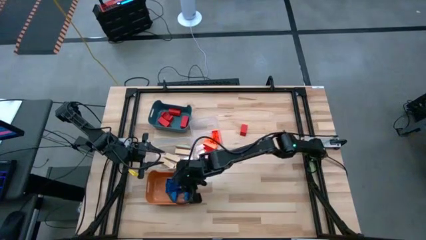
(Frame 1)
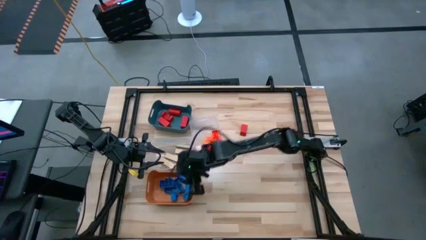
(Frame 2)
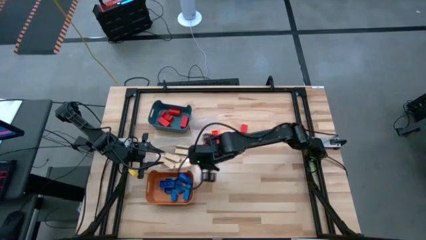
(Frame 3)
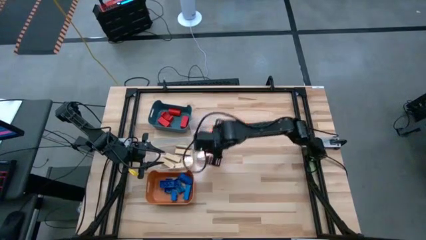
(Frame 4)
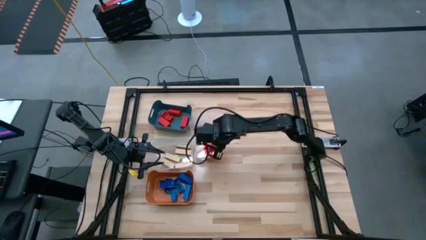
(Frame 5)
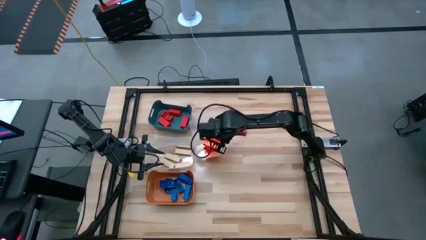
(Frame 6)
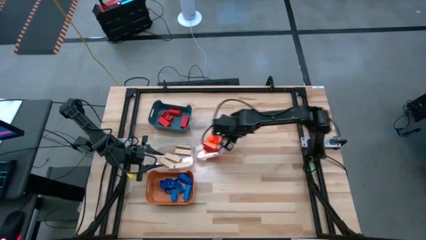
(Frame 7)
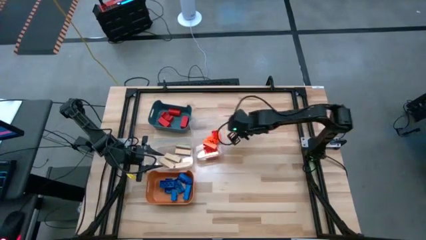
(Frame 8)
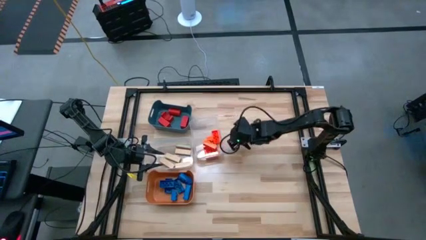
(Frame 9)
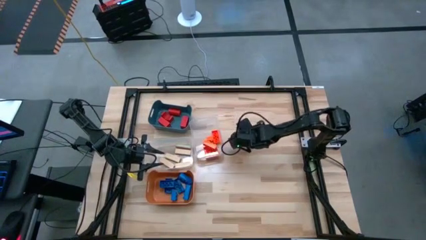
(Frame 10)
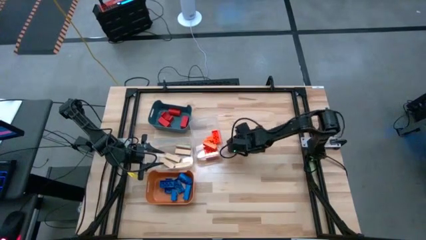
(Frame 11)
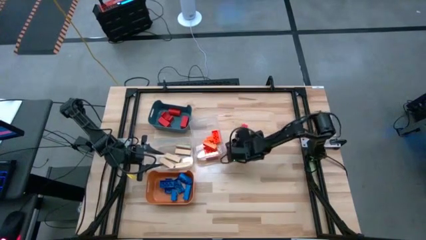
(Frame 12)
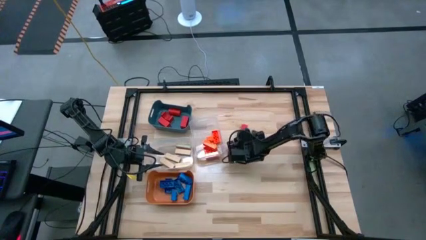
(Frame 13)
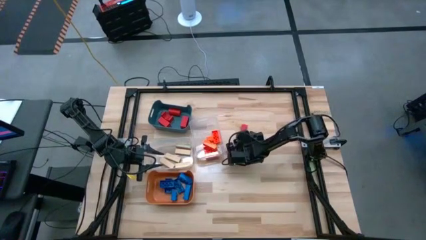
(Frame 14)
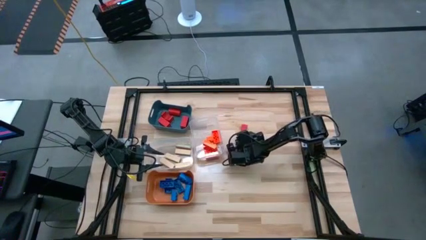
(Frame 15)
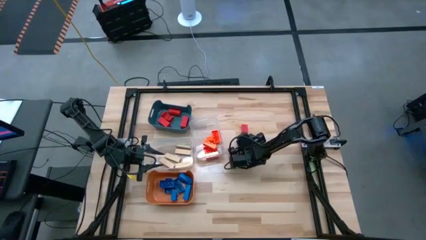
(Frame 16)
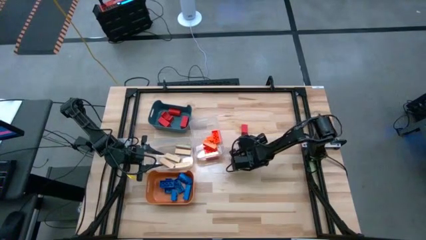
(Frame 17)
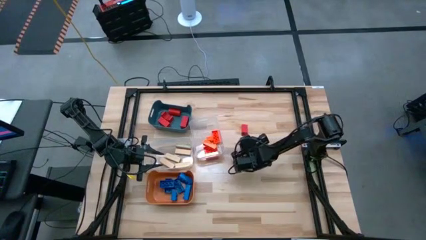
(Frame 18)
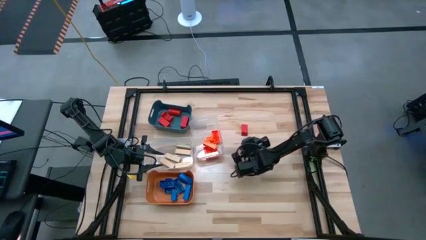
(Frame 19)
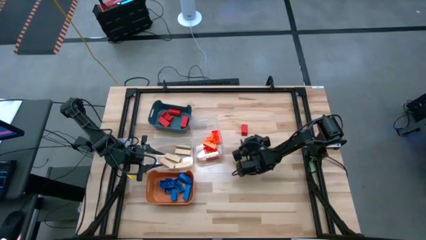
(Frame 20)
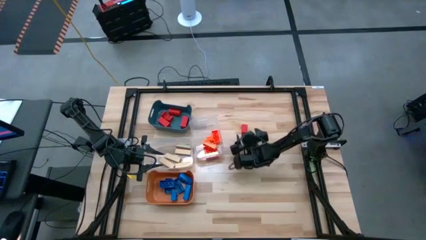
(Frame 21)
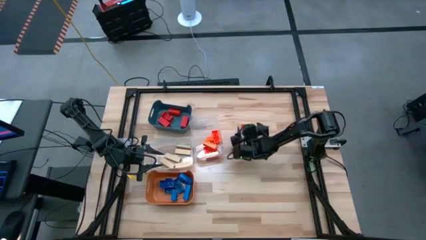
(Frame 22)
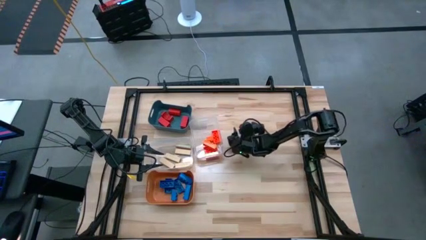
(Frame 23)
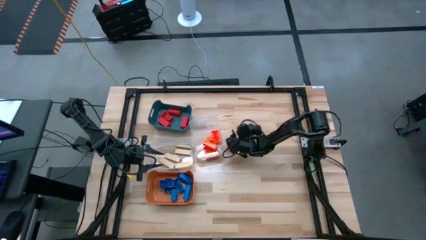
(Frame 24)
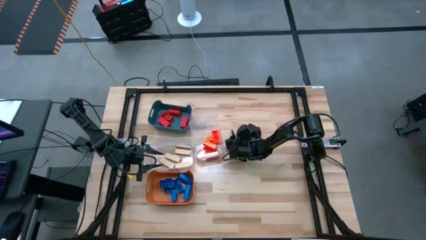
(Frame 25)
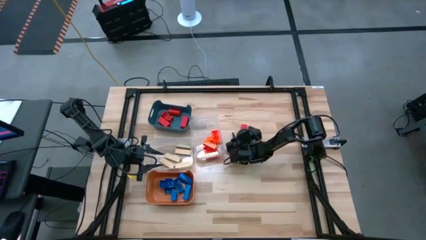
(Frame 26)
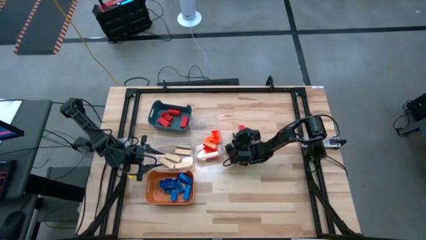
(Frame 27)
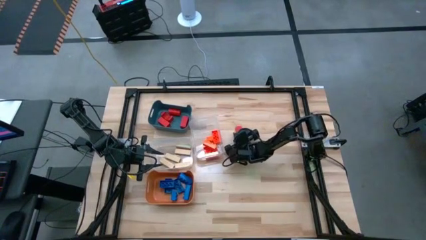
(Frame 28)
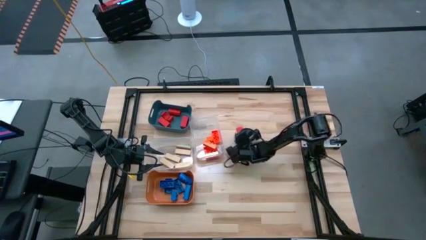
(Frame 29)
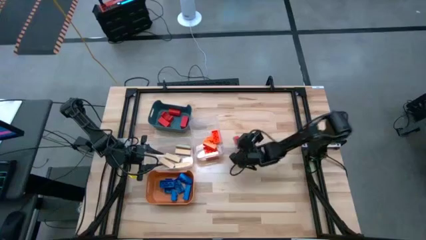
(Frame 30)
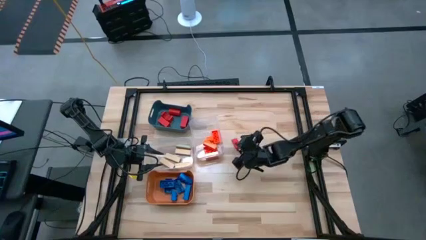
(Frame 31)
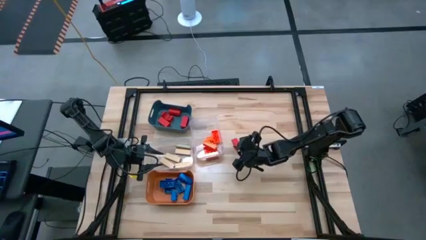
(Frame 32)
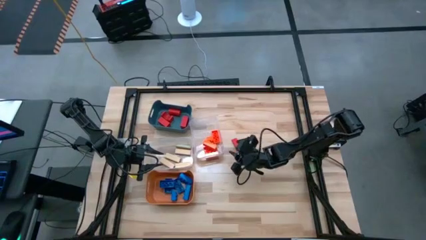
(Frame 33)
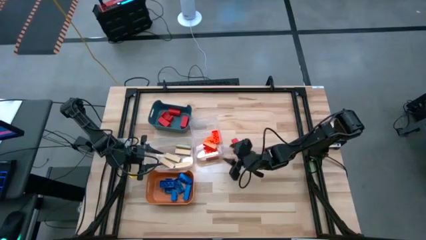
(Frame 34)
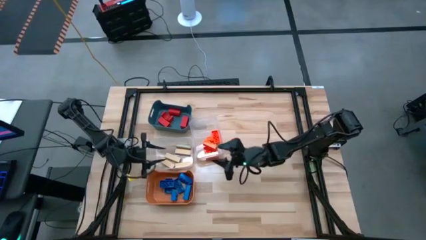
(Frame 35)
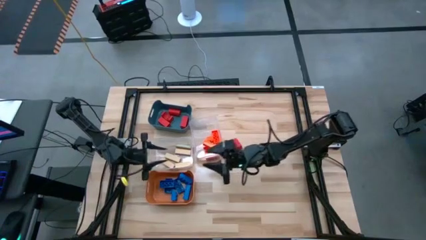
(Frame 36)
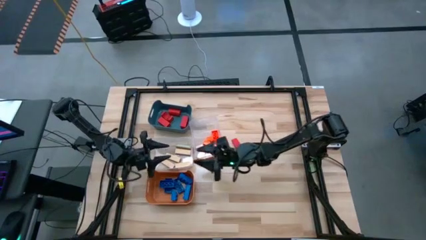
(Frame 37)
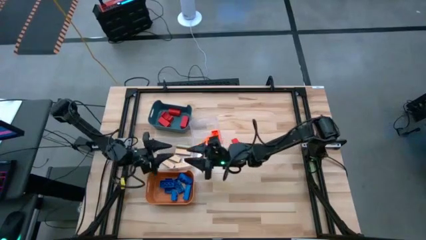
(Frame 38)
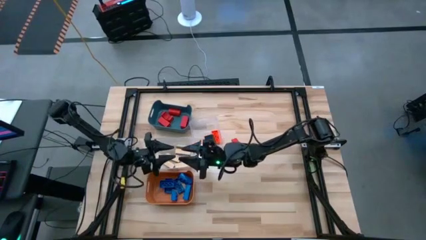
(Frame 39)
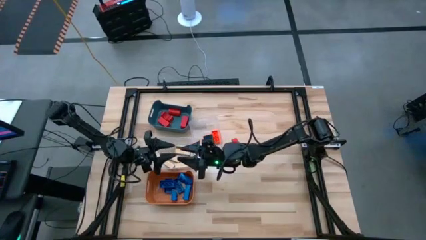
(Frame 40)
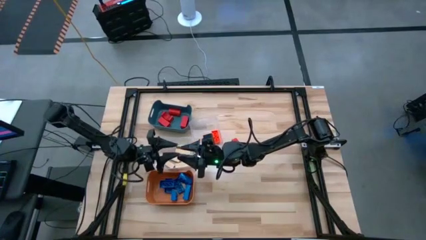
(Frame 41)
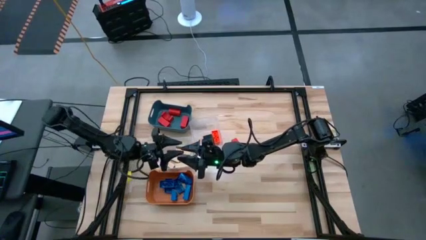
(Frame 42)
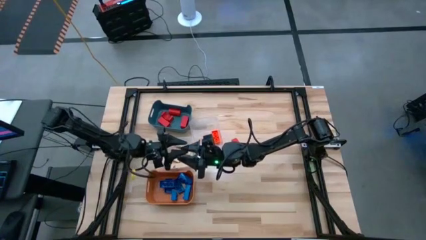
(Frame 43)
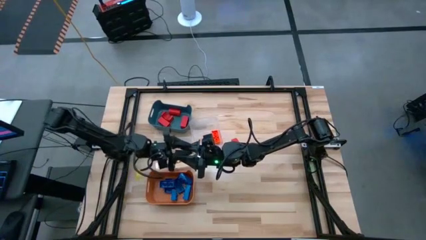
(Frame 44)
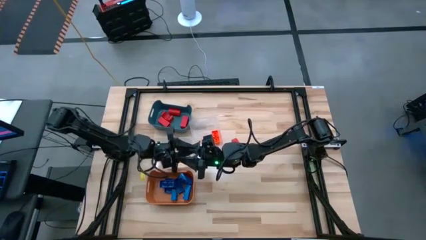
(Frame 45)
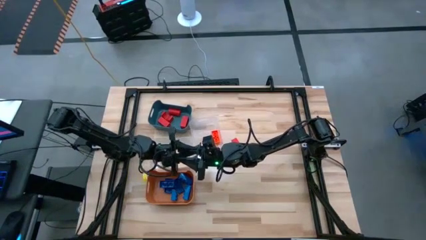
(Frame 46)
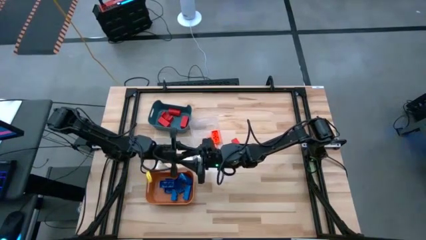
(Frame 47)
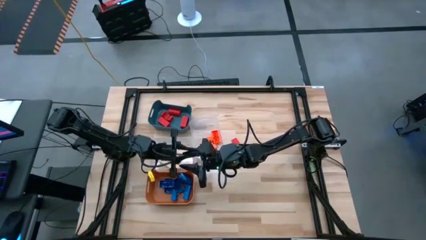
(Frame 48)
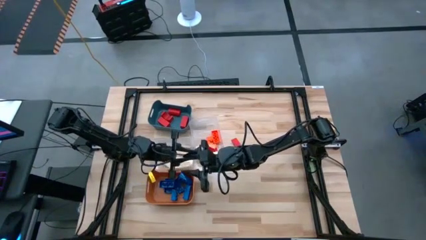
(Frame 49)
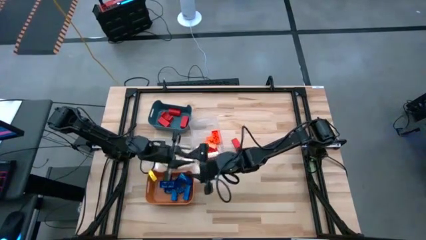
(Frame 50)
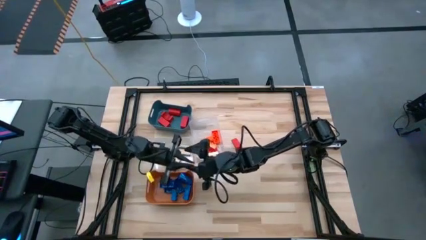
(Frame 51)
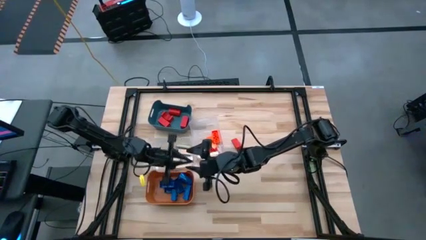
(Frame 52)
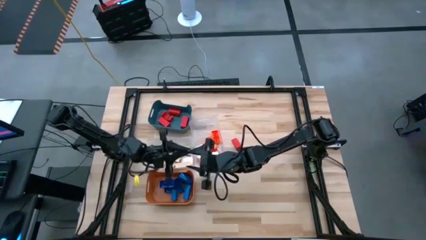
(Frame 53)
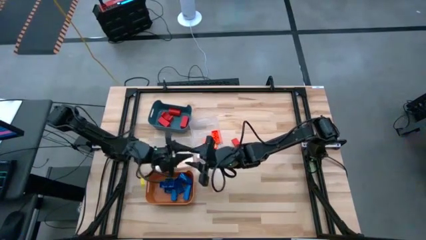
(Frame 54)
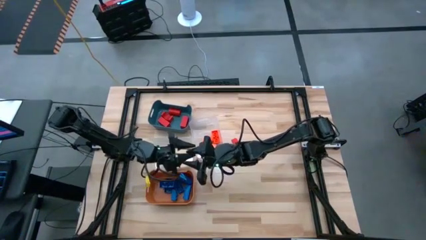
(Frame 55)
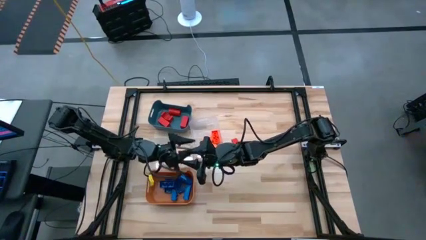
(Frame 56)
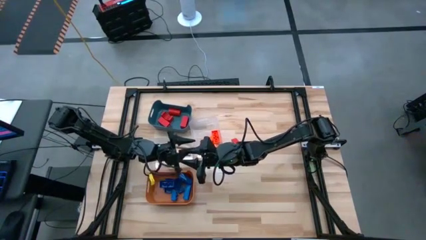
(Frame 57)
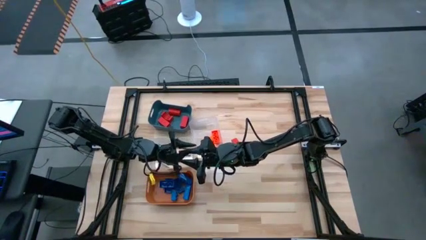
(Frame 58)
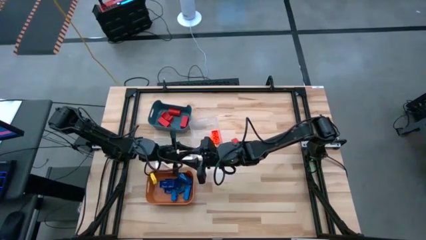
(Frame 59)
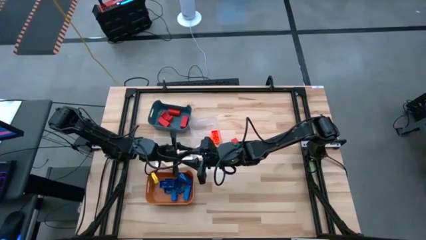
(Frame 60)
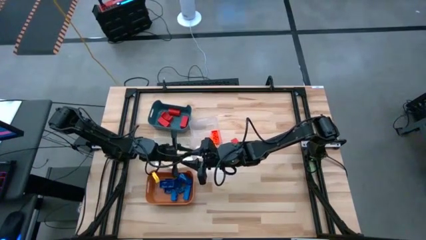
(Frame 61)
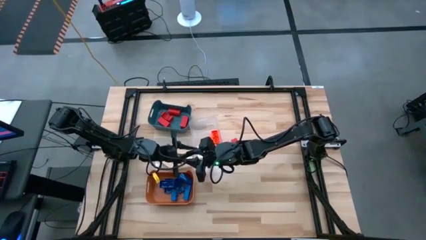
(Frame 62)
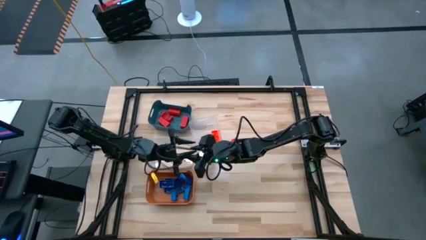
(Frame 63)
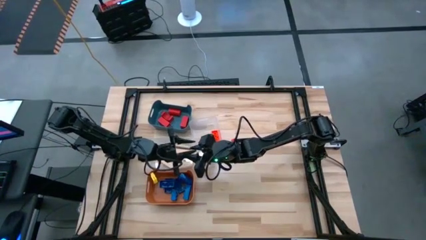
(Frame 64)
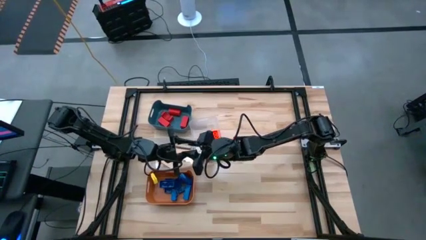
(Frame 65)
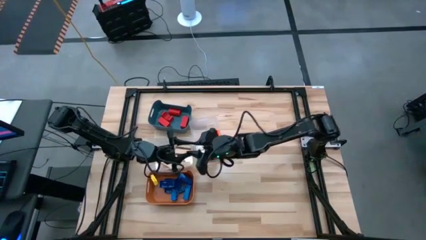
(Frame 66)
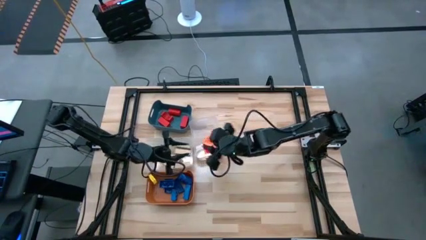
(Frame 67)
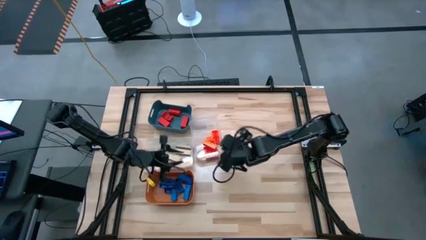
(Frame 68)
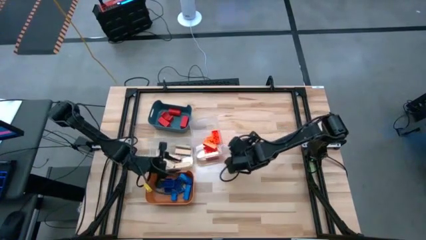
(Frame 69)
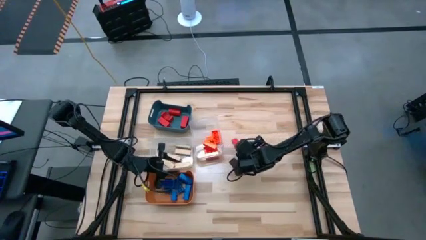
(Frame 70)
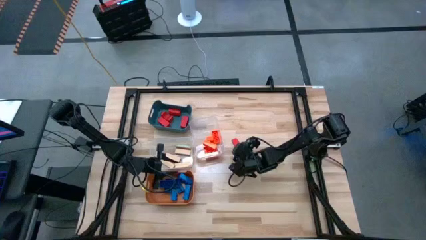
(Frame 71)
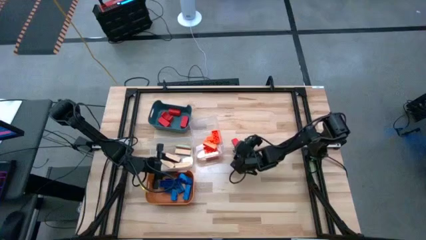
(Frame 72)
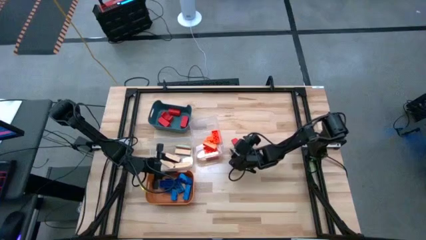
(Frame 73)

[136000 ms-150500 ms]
Task: Sort blocks
Put the red block into the blue bin

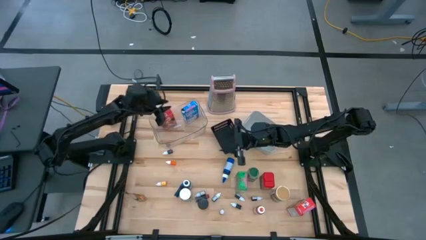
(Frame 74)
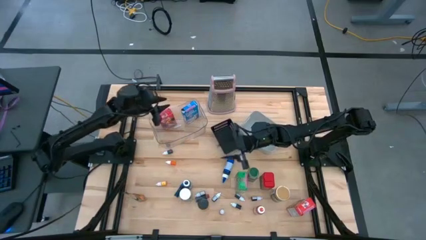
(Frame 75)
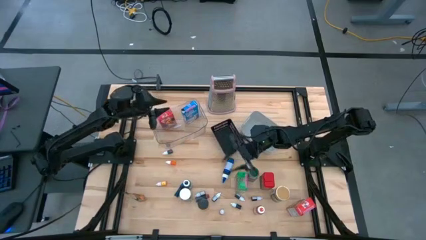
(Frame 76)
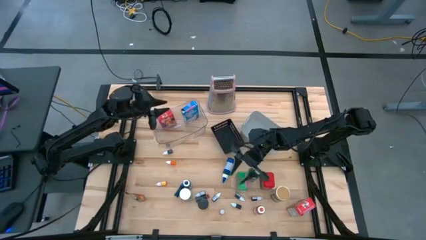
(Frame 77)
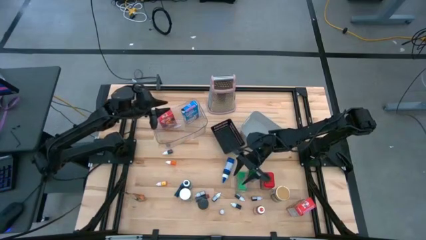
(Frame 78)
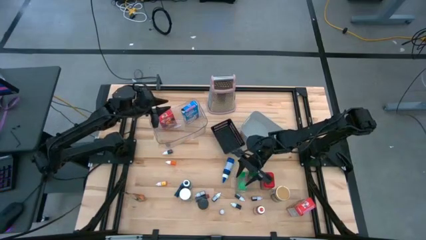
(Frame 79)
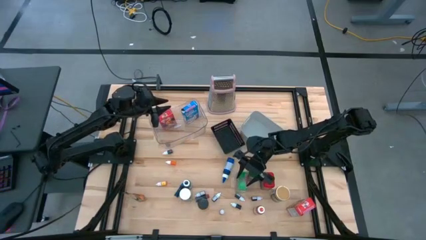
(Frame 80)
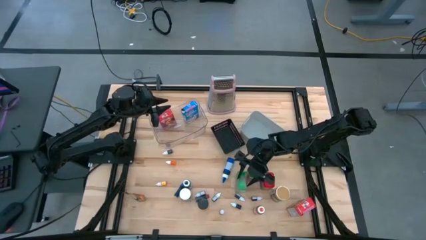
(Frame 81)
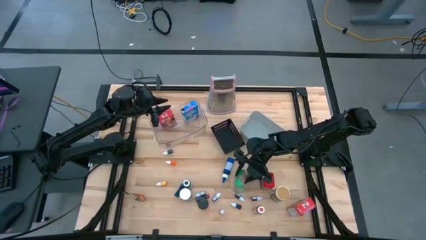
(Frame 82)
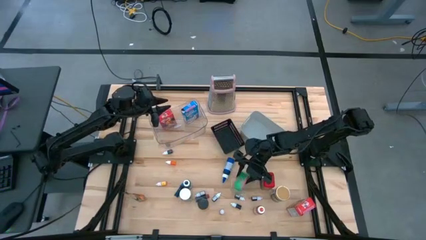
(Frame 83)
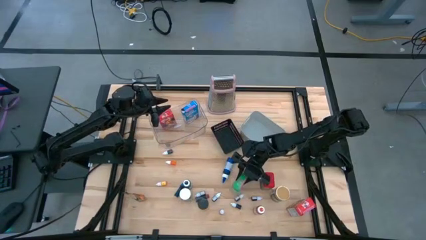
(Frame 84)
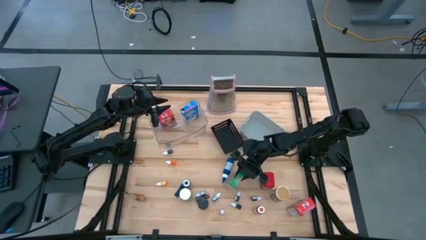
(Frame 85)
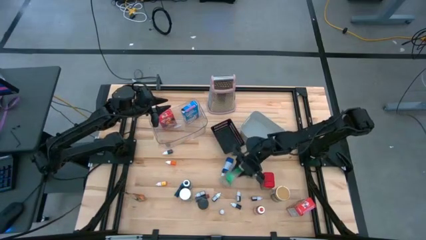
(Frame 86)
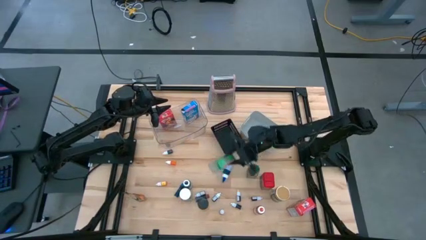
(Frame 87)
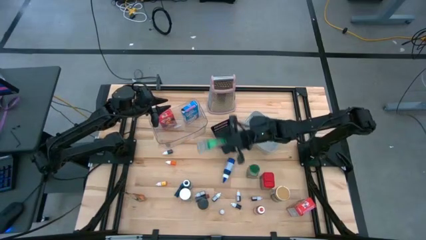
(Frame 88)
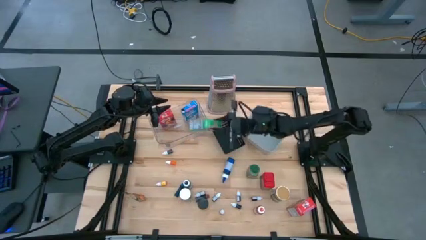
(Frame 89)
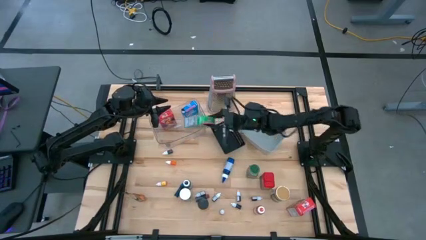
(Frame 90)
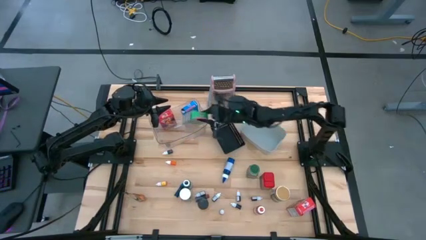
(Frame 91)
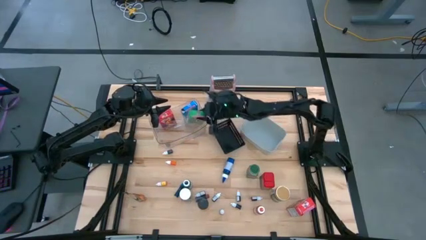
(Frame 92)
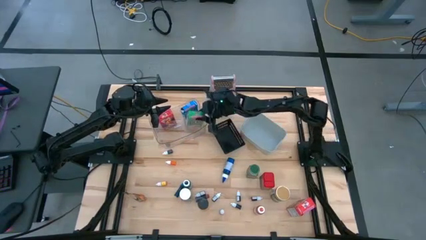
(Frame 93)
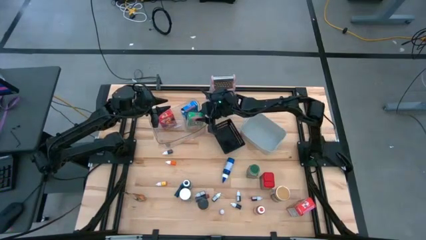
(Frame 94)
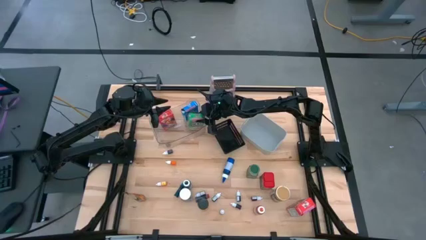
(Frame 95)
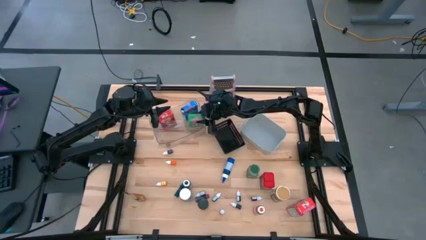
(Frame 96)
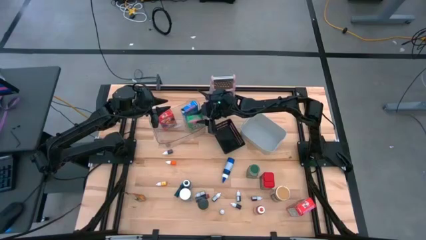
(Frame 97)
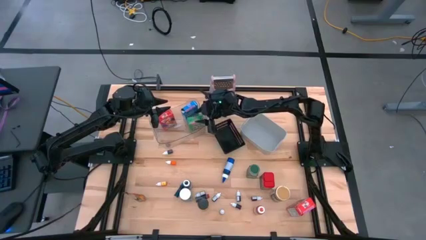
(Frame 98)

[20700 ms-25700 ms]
Task: Pick & Place Kitchen Items
Put the green cereal box into the transparent bin
